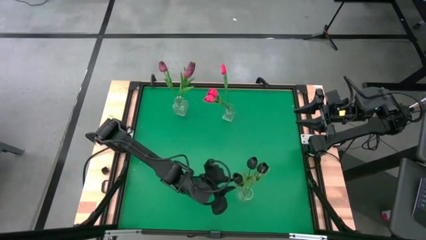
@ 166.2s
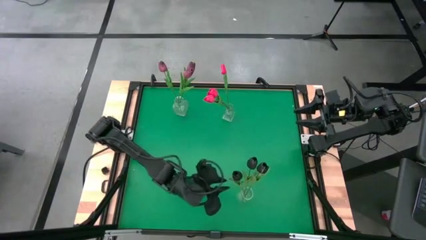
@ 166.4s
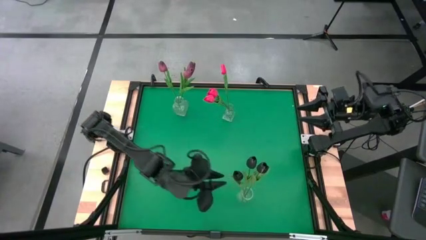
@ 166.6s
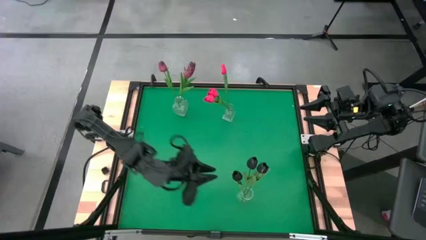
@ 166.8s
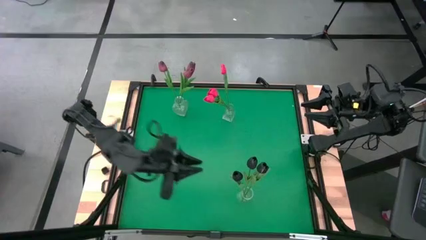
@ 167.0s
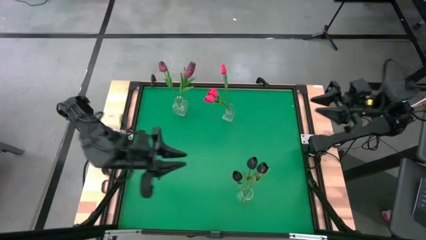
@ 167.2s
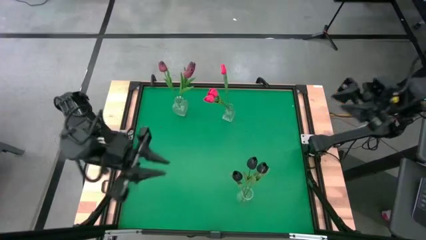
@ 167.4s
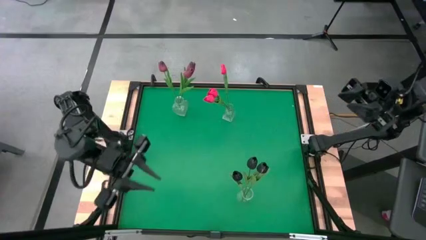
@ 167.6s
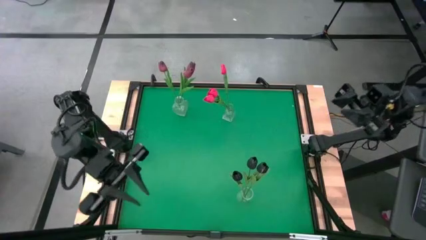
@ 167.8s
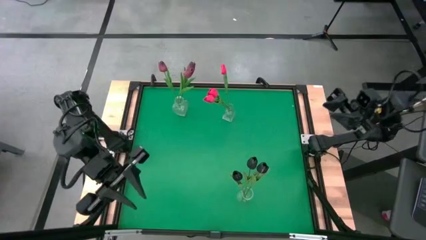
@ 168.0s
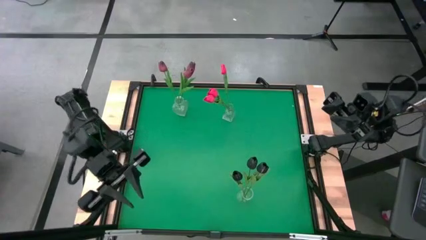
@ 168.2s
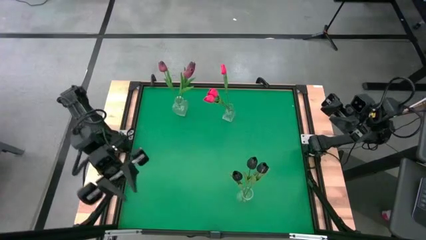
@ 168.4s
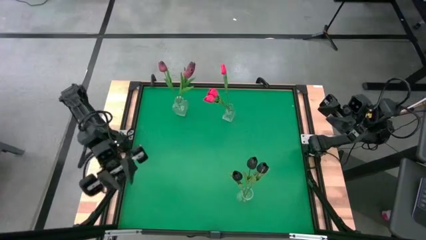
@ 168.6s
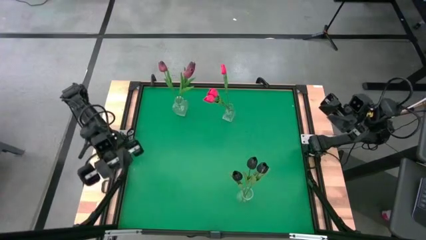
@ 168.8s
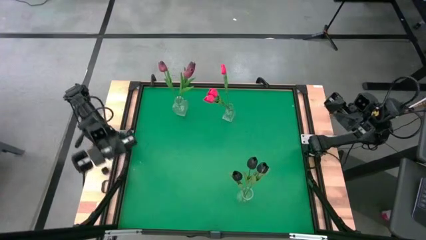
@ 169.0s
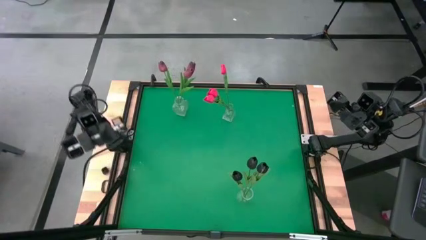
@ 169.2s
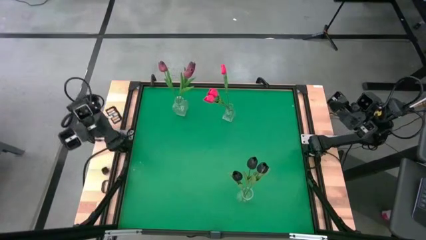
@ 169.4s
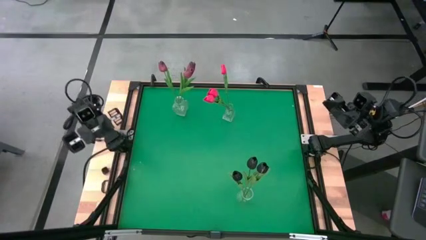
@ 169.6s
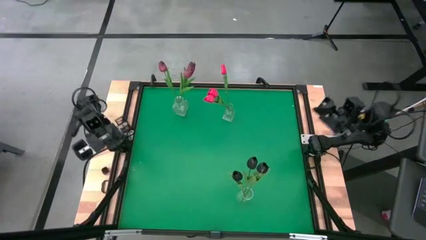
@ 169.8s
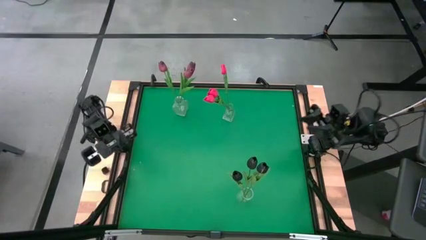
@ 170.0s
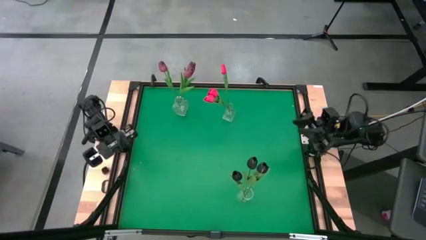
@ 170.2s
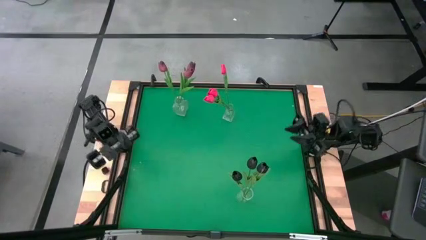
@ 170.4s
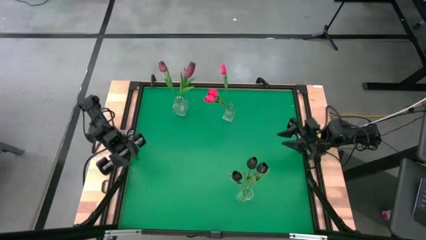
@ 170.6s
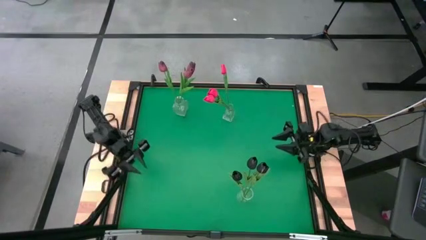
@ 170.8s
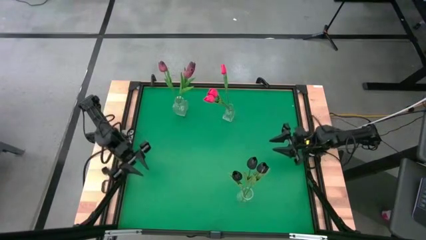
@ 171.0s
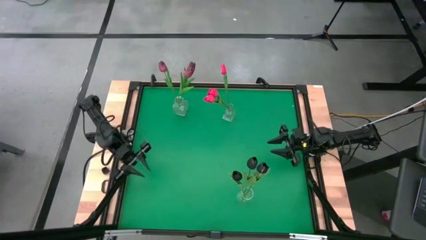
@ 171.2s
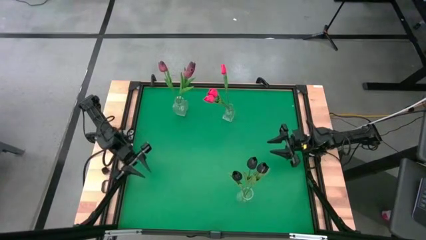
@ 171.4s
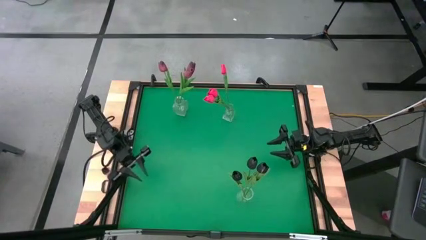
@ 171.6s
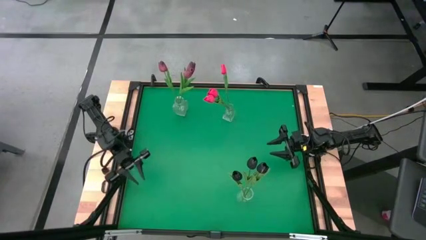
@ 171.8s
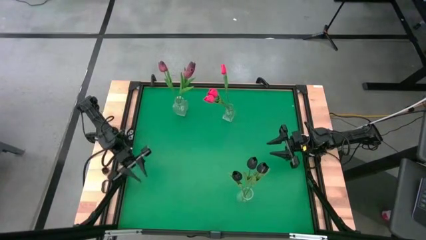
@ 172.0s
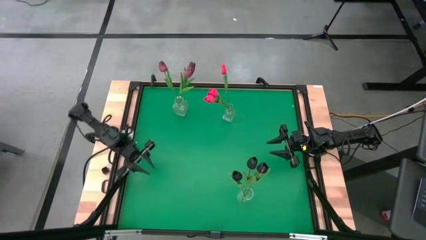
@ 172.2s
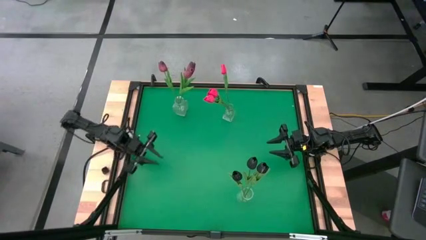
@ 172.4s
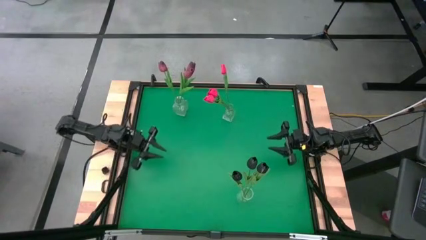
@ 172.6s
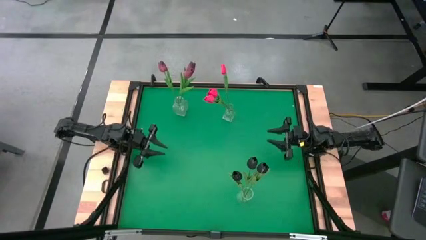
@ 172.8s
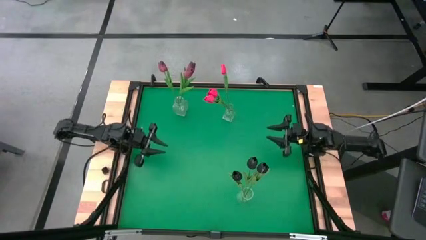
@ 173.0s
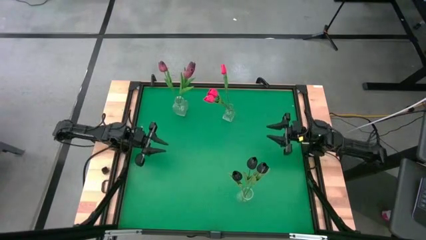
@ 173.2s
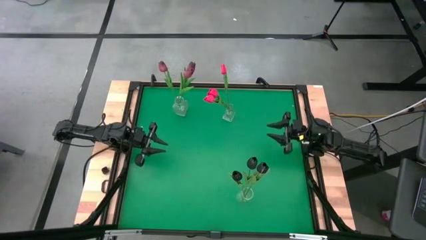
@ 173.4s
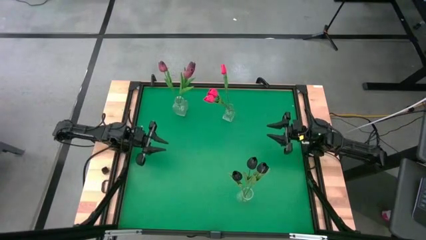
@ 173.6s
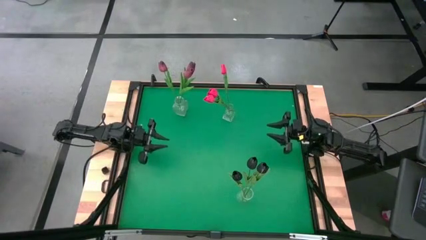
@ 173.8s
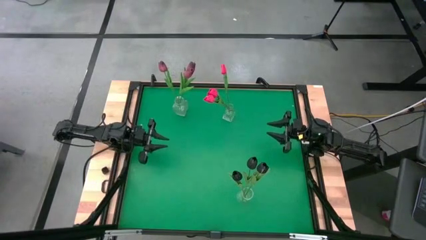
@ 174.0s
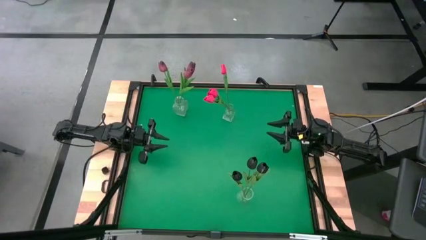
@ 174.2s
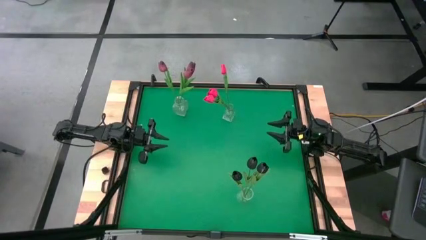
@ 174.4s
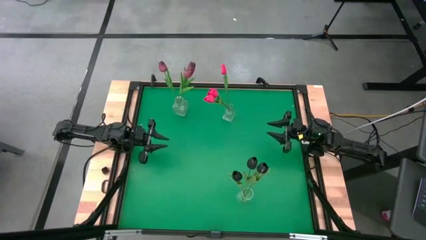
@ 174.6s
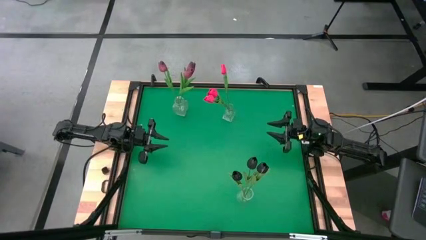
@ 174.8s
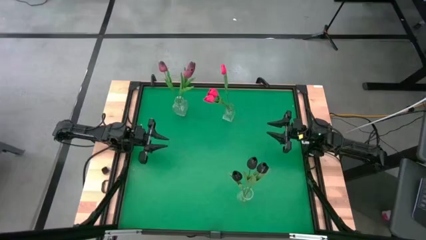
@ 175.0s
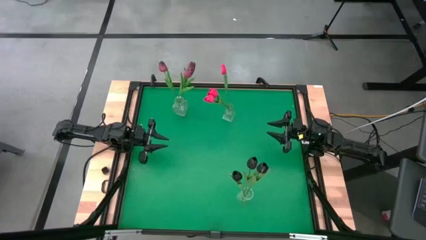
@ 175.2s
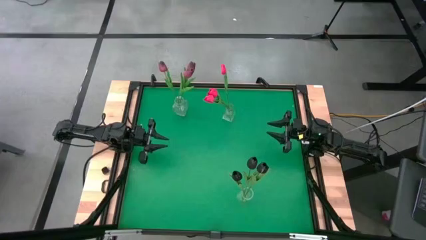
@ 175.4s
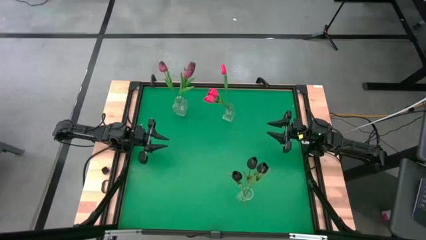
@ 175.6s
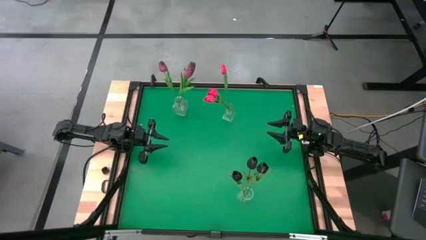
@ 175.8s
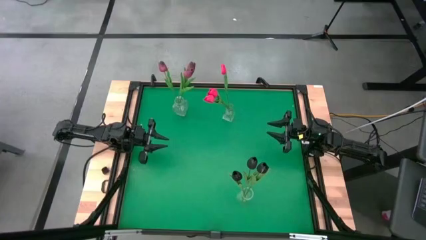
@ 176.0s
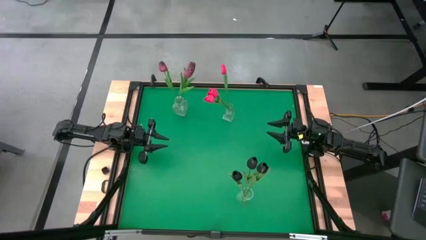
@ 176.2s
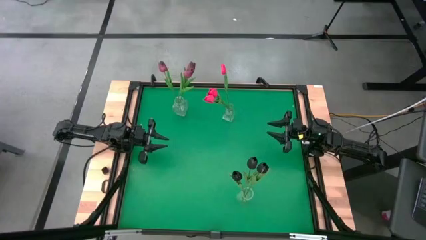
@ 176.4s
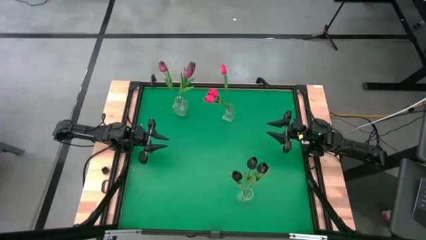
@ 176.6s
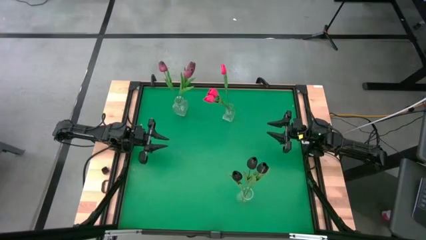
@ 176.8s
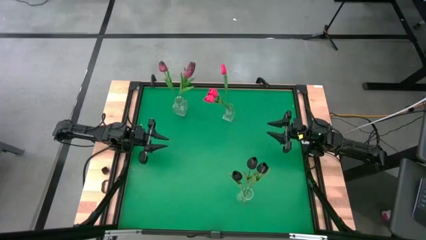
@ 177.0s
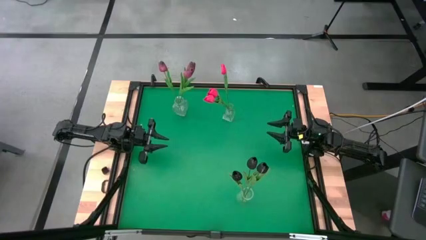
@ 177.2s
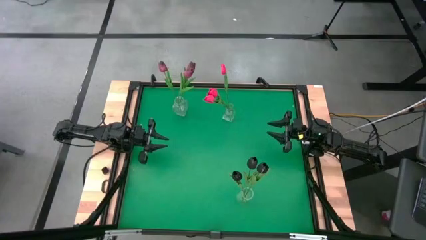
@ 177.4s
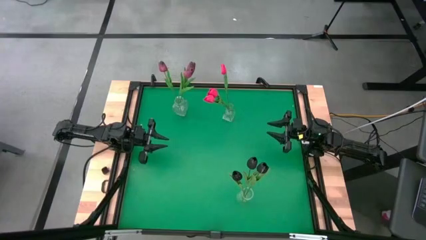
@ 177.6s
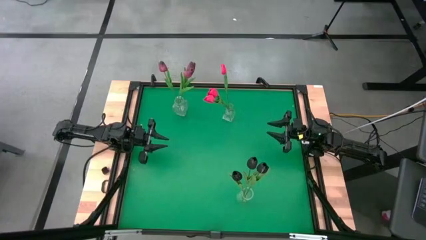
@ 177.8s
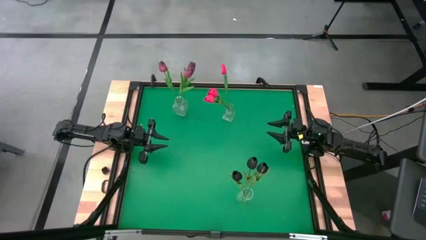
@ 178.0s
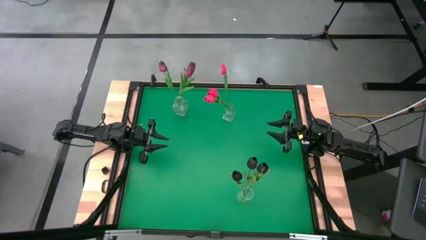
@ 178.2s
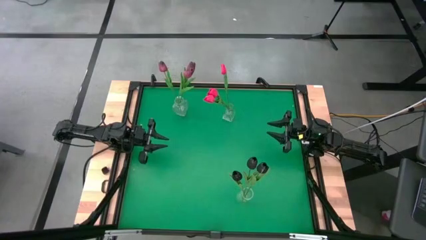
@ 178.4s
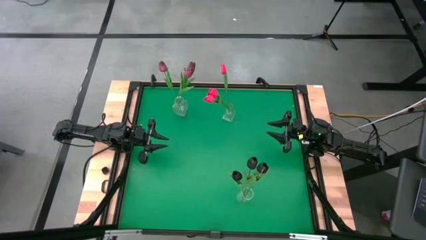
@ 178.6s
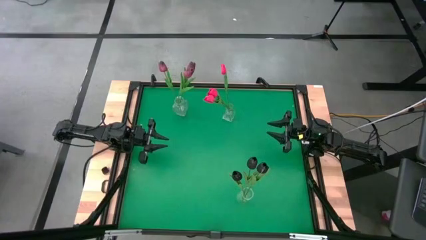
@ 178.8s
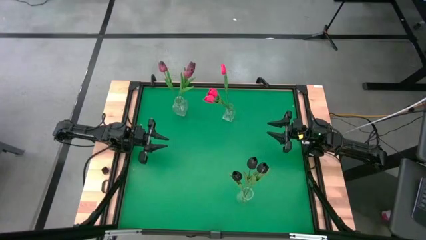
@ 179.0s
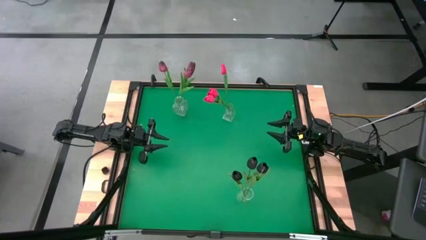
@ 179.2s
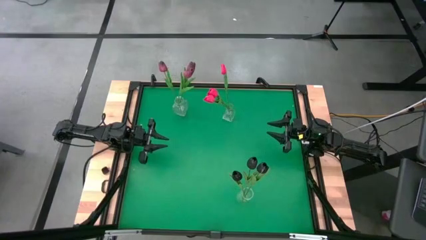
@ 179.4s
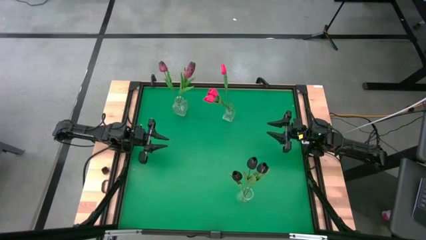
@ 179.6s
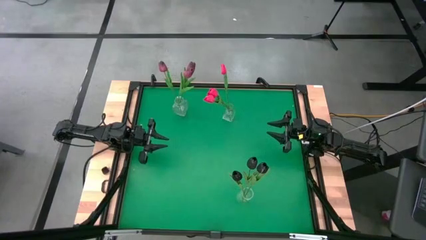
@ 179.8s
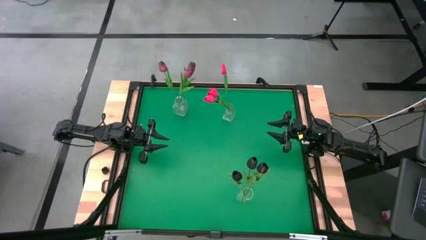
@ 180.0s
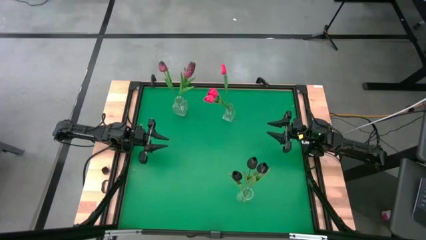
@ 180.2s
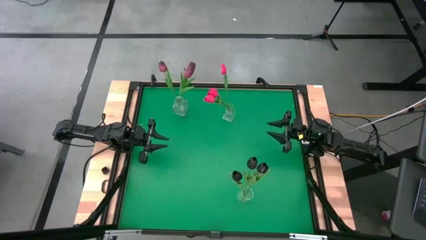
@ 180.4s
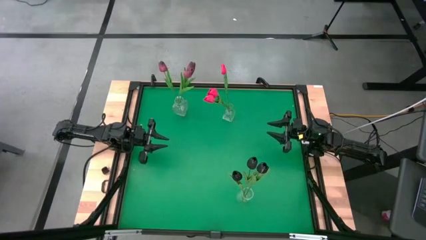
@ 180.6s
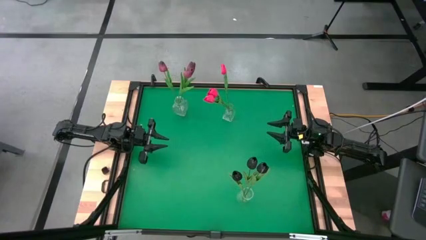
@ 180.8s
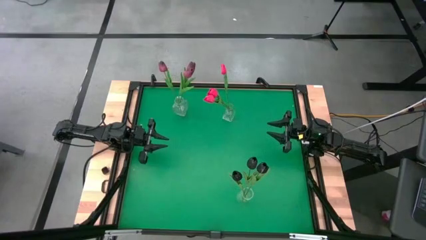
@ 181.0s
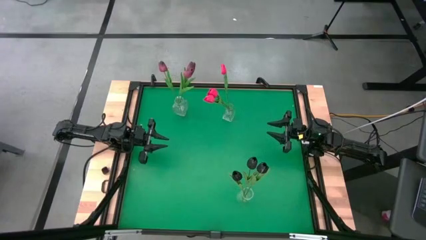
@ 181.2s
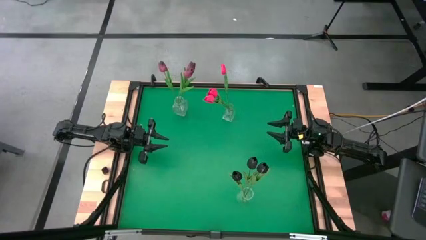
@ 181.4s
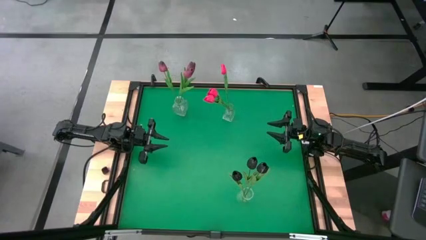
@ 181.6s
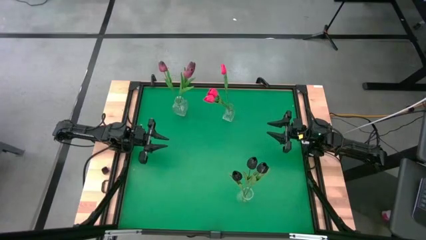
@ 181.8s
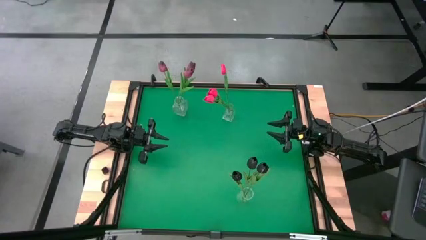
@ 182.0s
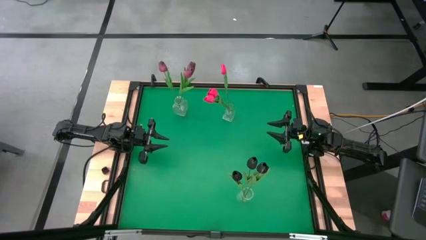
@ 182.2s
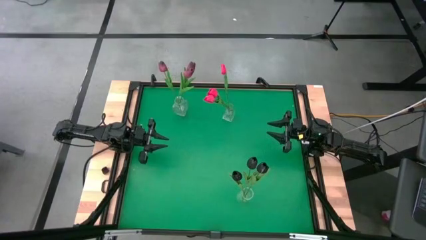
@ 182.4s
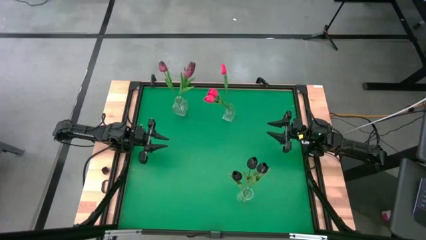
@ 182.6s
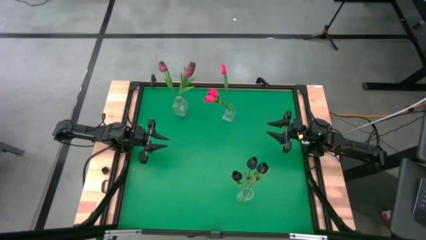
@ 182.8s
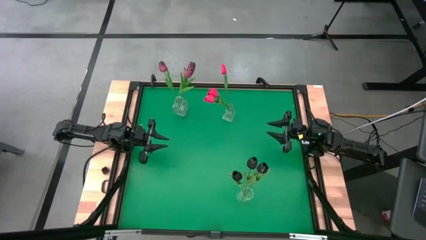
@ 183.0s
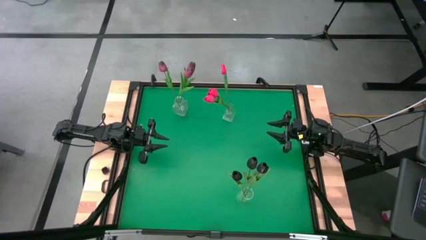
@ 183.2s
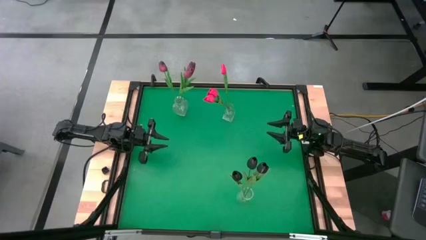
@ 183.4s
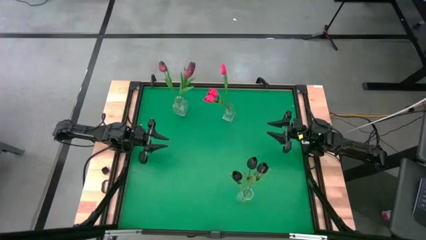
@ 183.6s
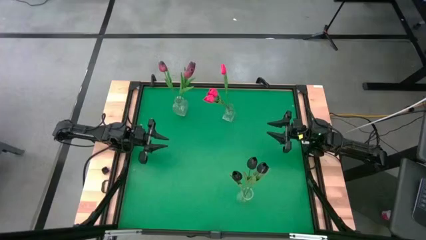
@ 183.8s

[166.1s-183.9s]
Task: Sort flowers into vase by color
Return to Home Position
